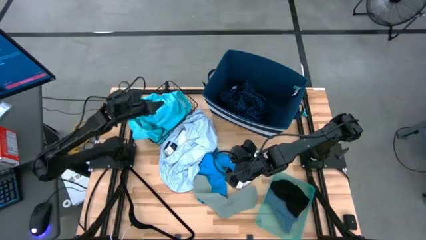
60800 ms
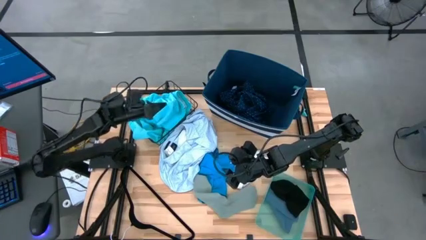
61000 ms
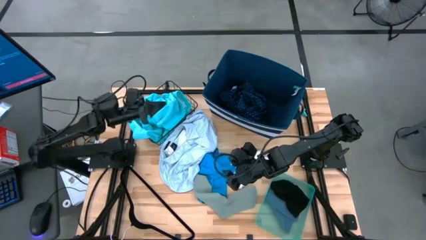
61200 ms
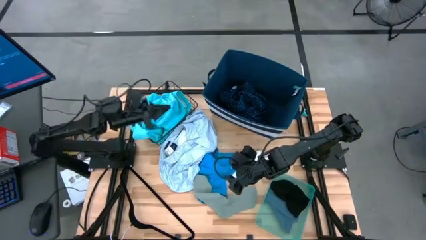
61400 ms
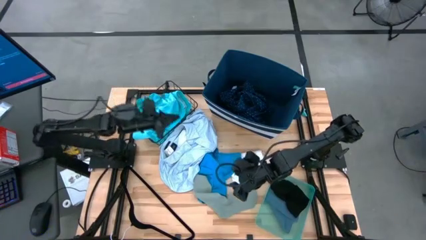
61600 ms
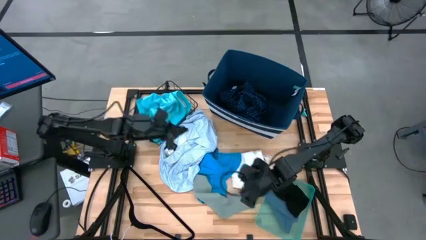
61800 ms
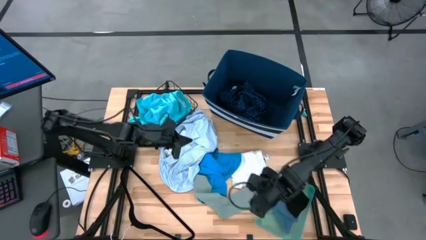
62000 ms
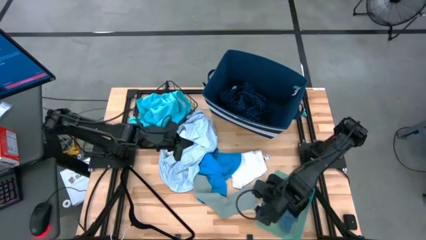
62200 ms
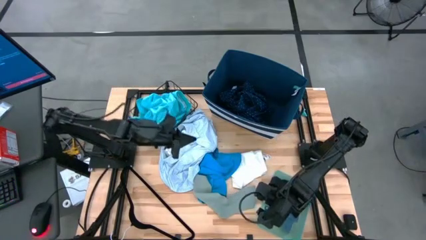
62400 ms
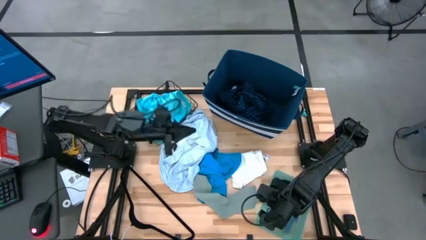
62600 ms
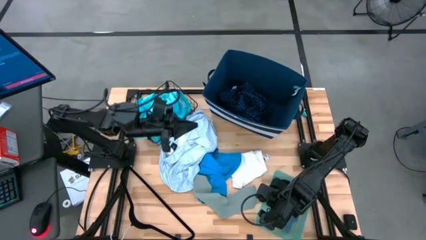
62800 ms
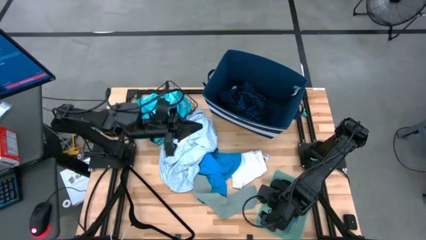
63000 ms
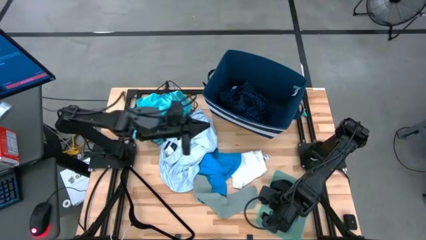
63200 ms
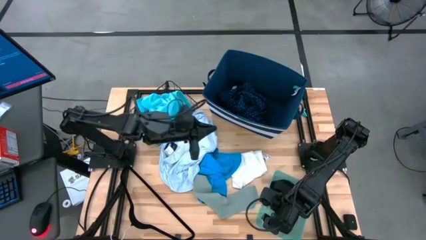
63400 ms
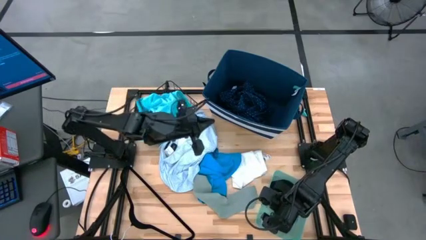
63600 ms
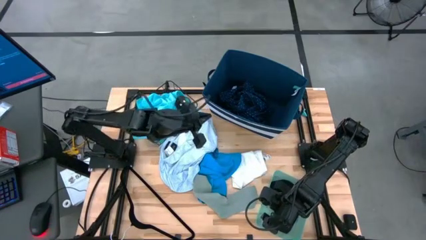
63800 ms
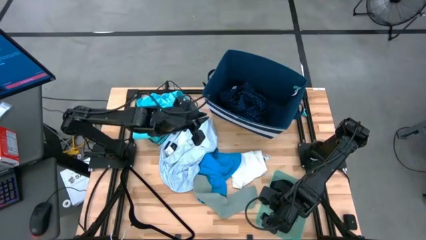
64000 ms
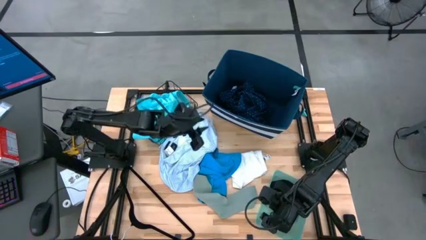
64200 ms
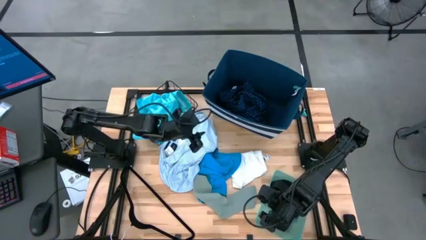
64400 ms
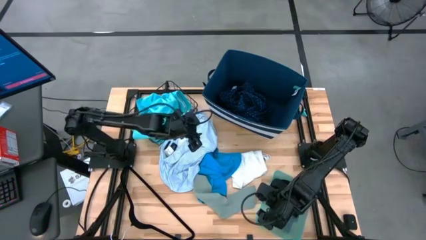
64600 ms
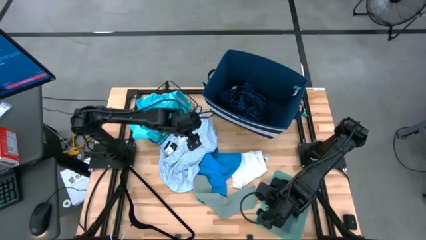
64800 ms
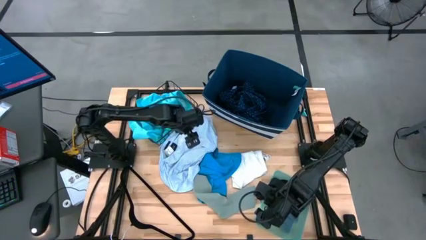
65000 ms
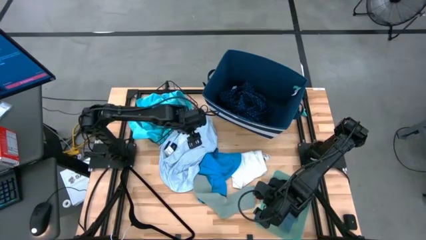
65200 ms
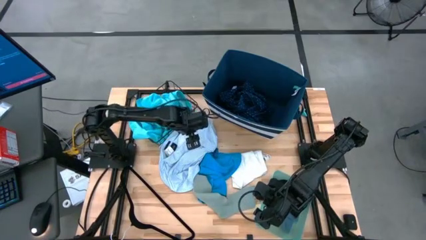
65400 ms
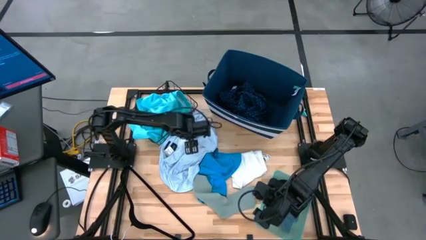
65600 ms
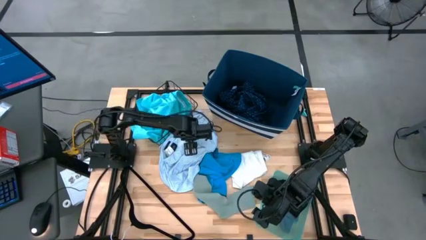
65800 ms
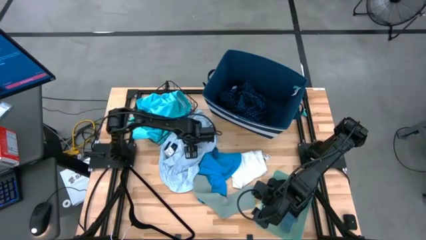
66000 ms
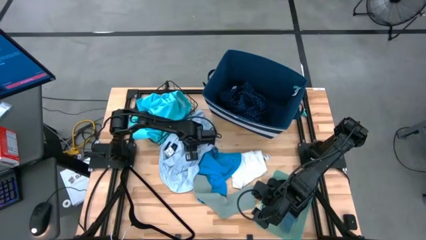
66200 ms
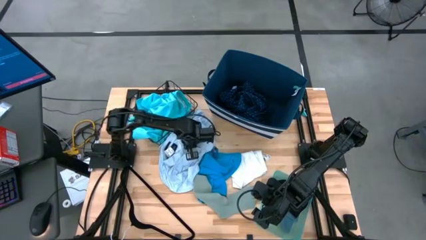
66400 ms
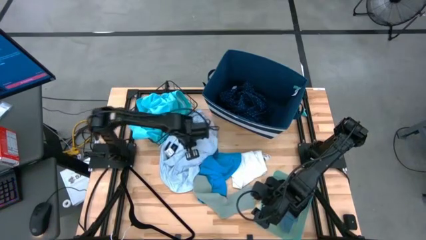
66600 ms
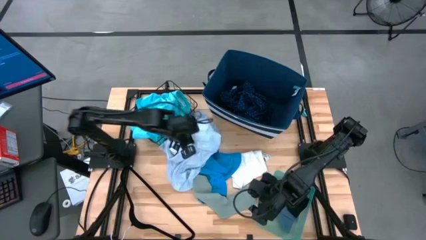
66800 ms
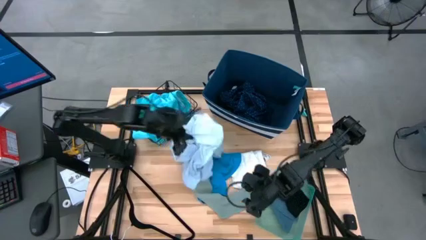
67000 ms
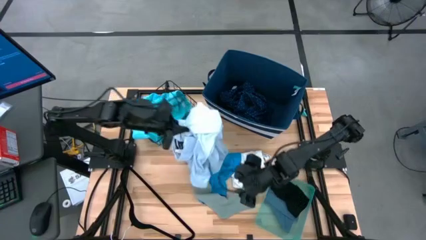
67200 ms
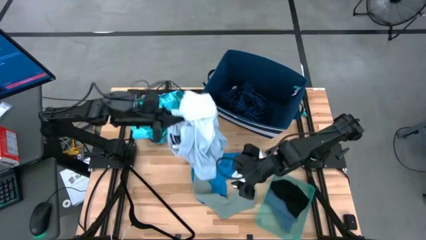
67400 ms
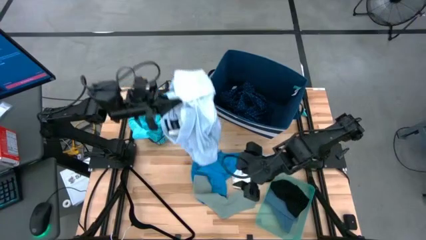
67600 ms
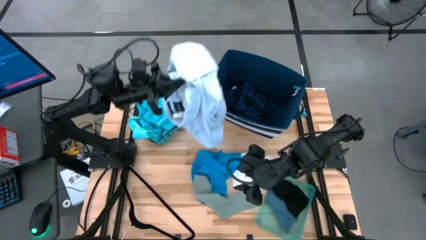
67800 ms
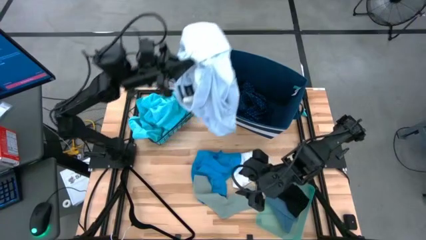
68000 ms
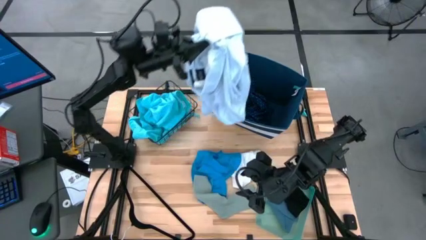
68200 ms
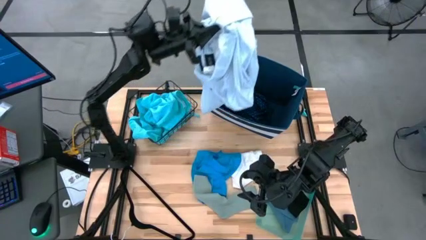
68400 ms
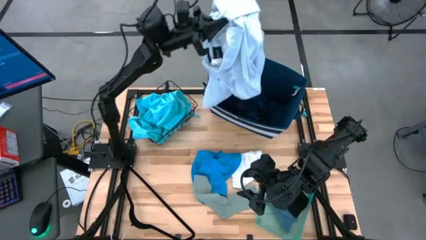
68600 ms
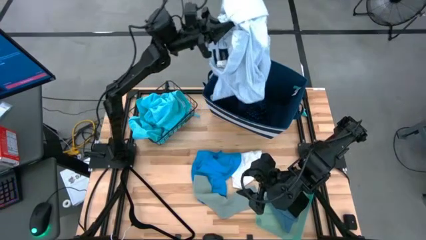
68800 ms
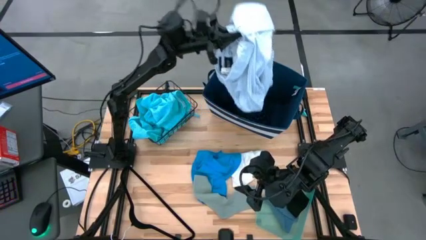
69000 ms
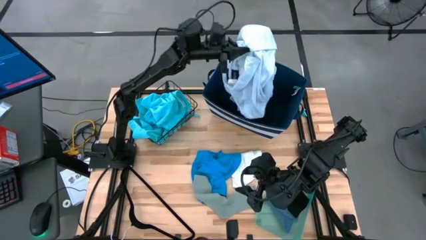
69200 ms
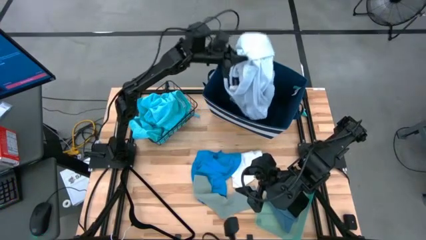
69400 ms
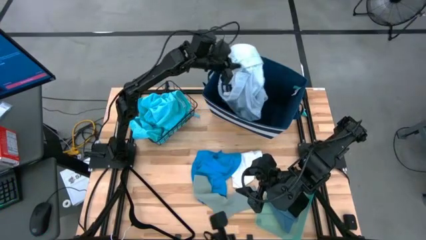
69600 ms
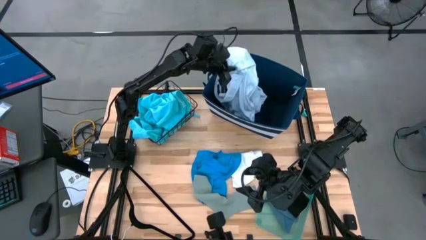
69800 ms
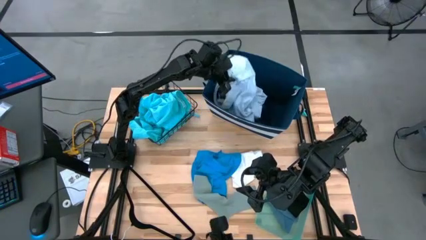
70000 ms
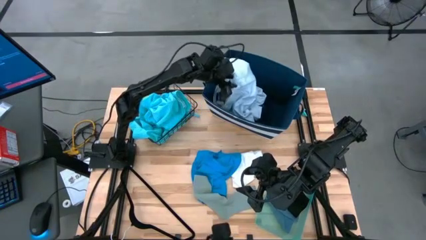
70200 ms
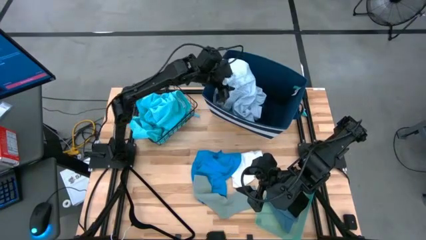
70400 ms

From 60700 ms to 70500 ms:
Task: Pick & Place Cloths
Put the blue polo shirt into the blue laundry organizer

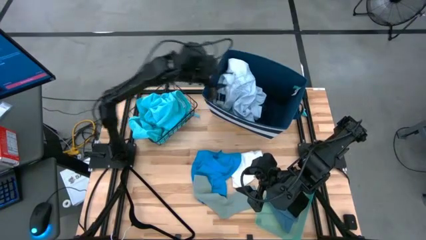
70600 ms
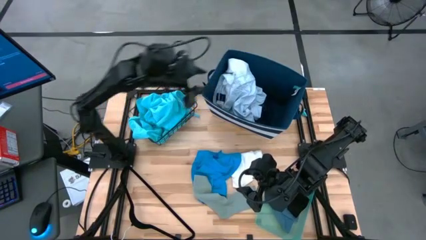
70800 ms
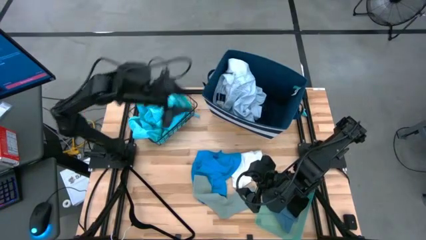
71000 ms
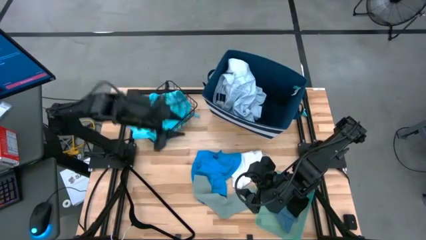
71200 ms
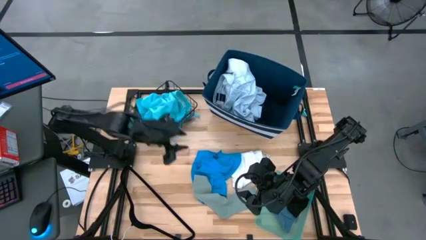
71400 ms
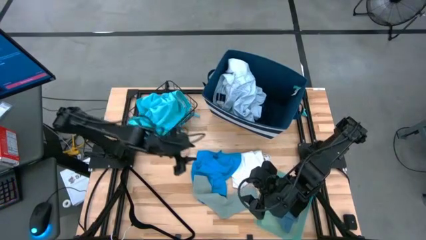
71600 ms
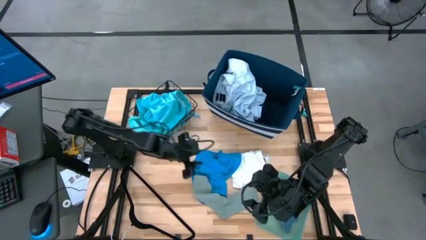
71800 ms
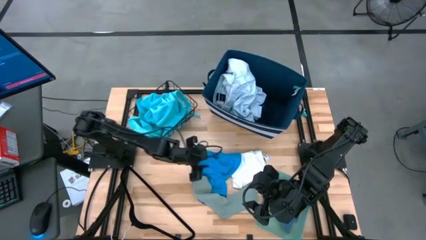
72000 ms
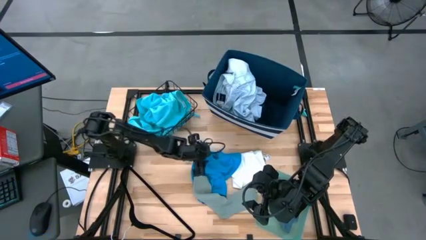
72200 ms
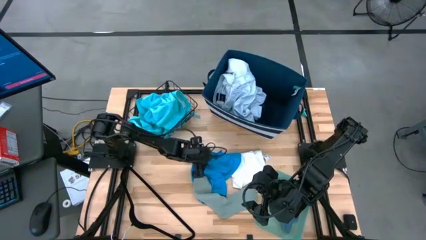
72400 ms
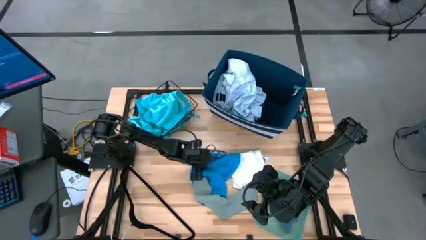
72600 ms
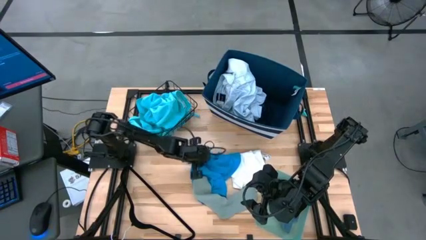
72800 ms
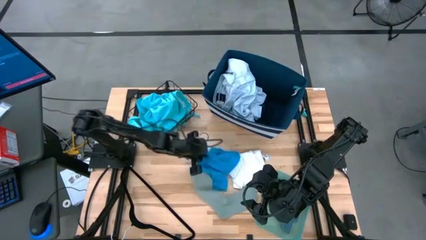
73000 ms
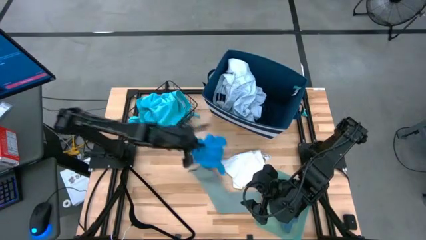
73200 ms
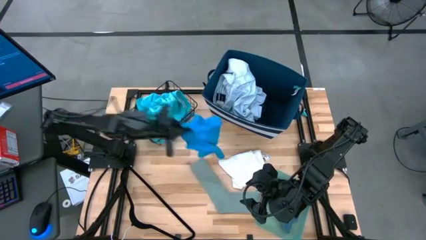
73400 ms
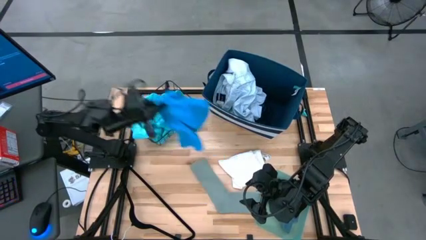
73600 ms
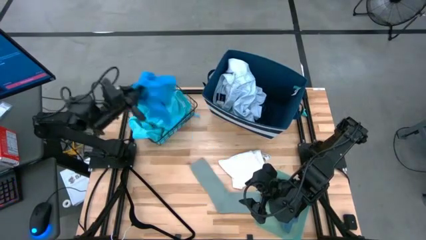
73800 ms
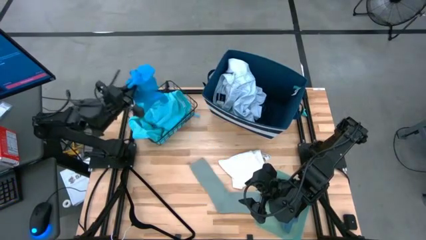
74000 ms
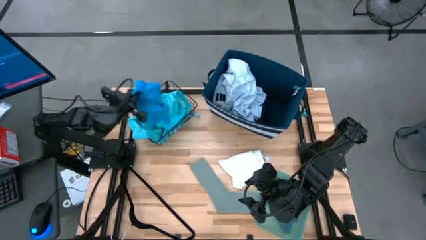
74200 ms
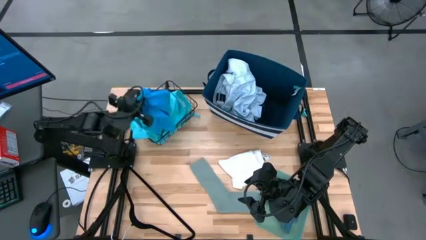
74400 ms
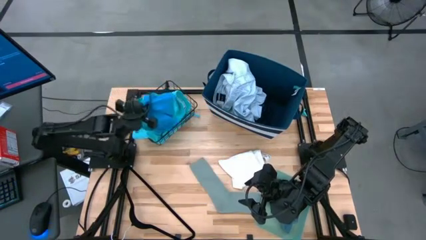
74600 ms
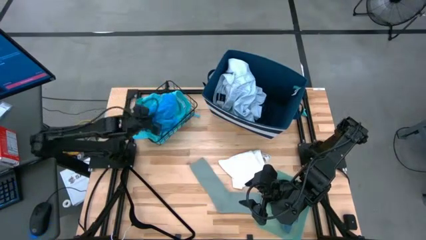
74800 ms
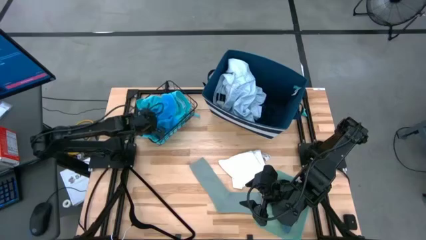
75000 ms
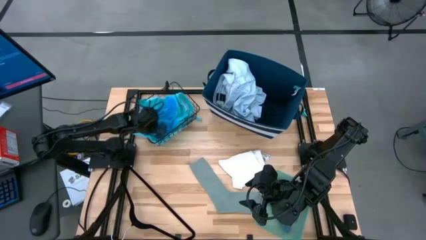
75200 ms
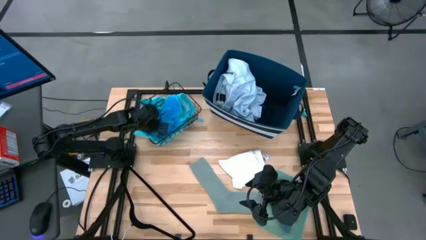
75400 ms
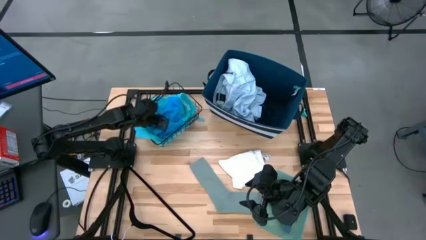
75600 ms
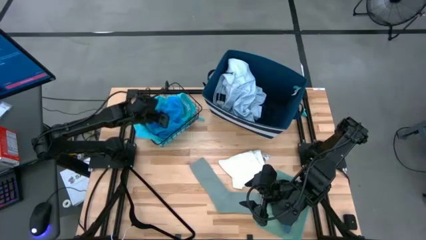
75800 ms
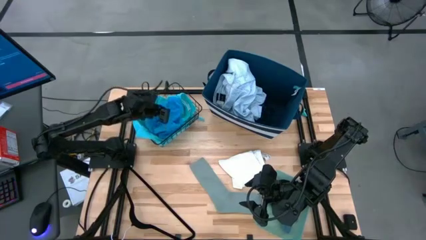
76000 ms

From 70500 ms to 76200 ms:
Put the blue shorts into the black wire basket

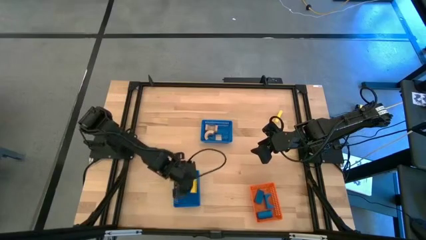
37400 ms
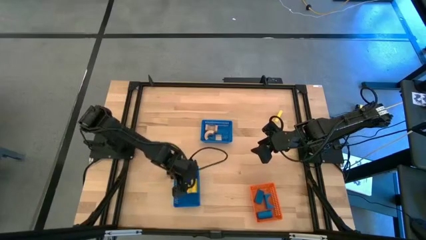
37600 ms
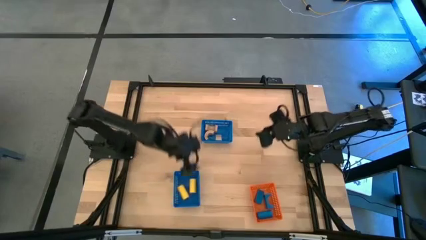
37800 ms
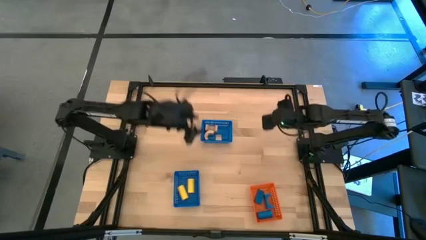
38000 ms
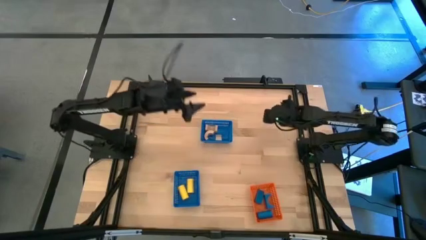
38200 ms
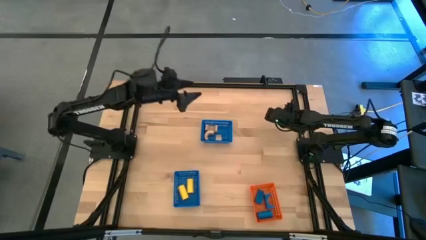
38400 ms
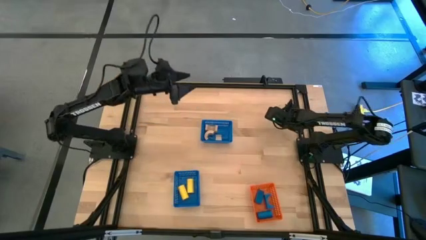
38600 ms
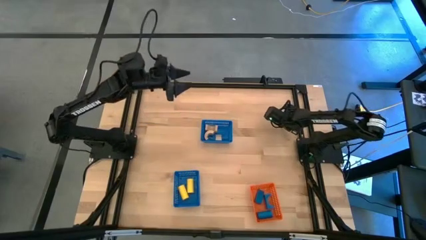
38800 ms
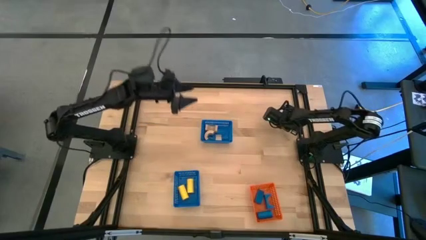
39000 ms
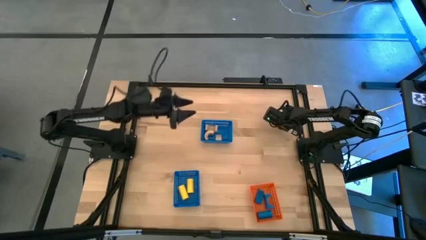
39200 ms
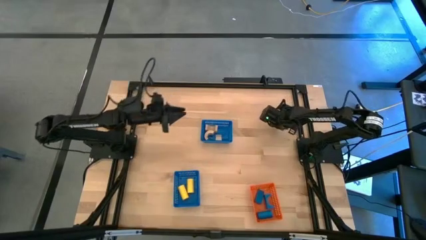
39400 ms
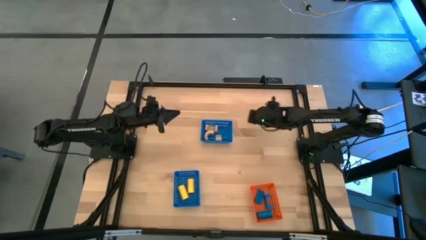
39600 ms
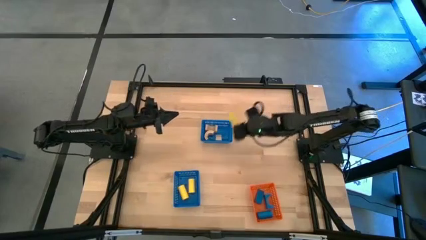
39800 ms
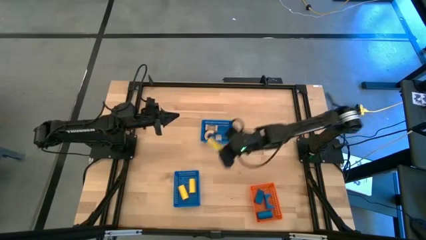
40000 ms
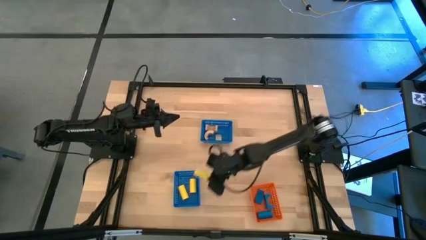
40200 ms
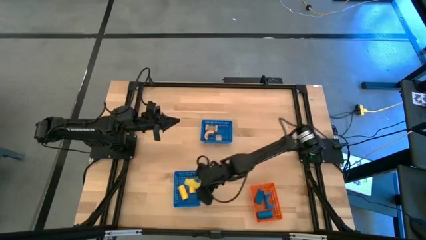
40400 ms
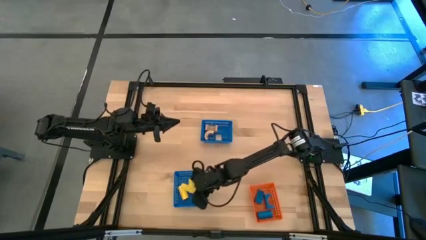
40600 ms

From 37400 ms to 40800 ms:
Task: Sort & place blocks by color
Put the yellow block into the bottom blue basket
